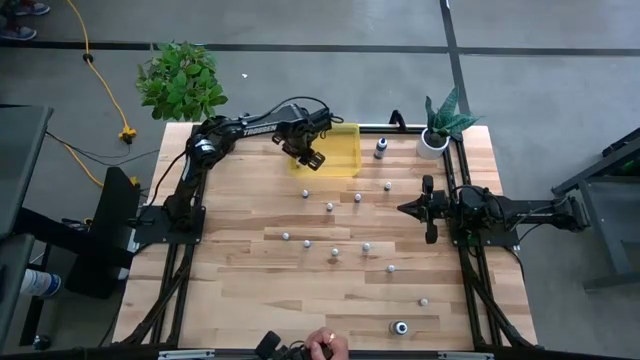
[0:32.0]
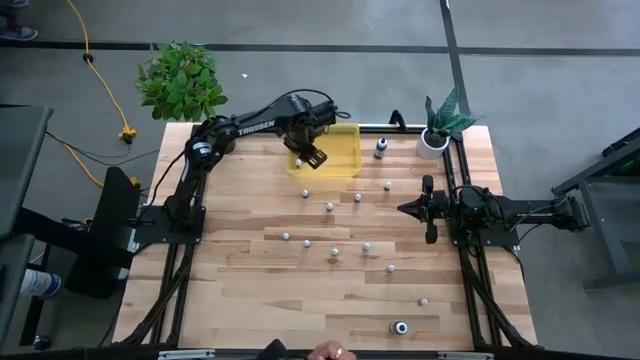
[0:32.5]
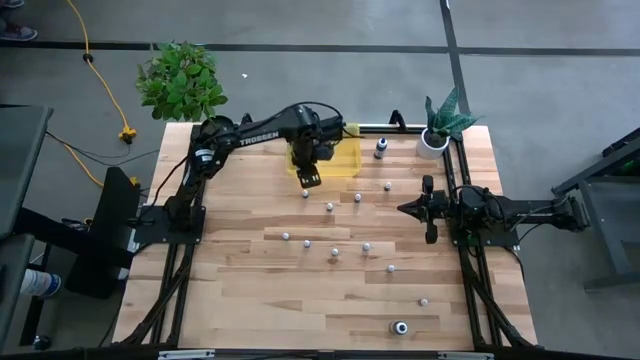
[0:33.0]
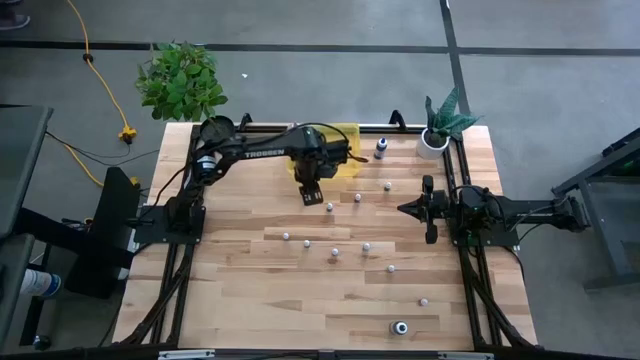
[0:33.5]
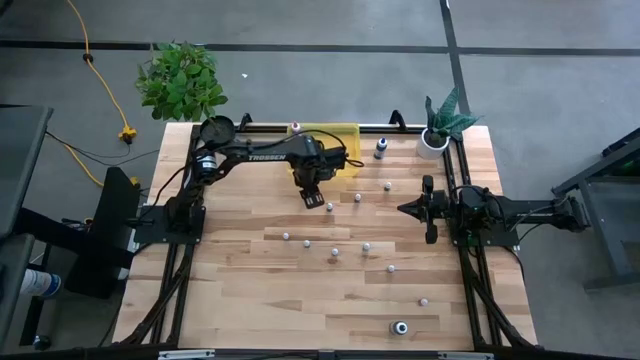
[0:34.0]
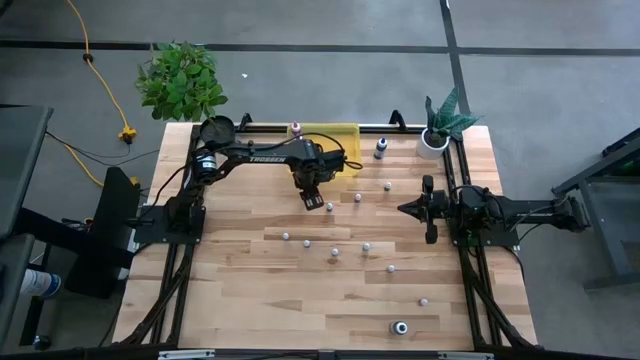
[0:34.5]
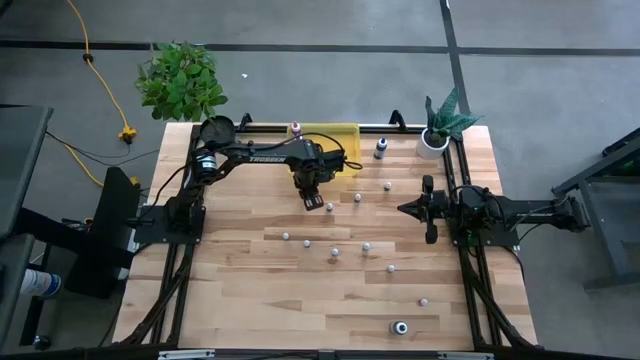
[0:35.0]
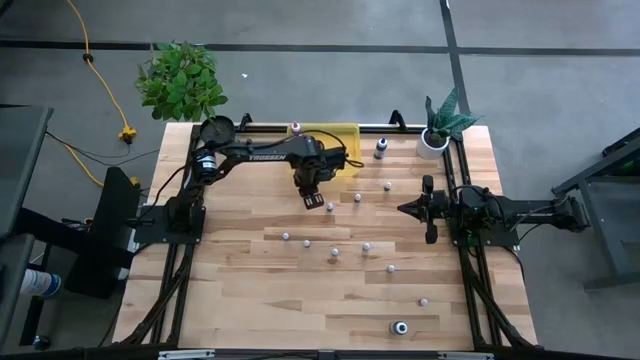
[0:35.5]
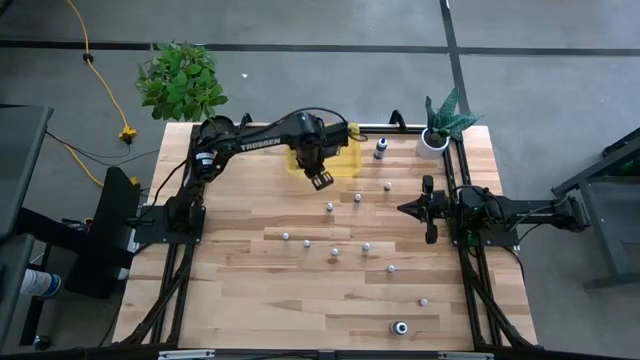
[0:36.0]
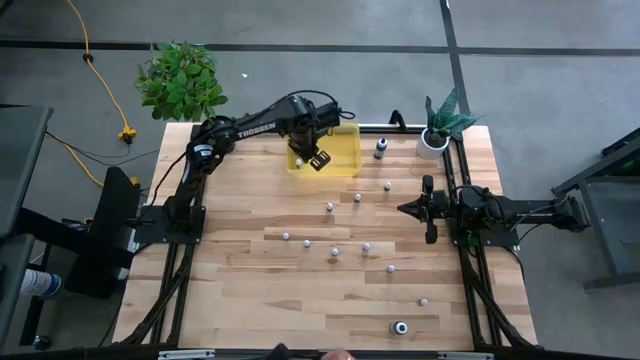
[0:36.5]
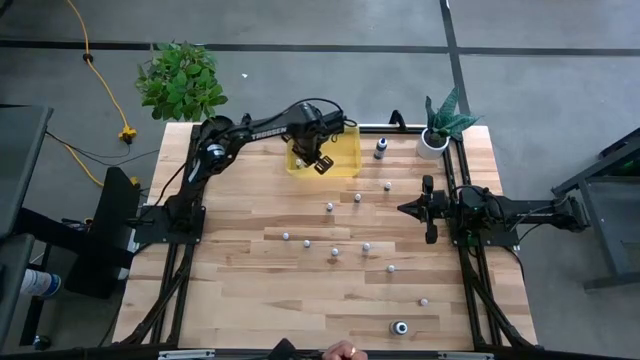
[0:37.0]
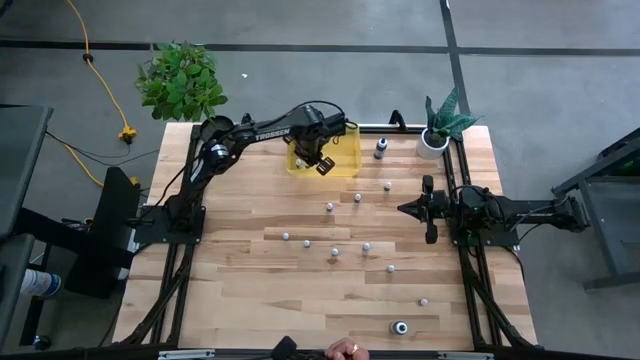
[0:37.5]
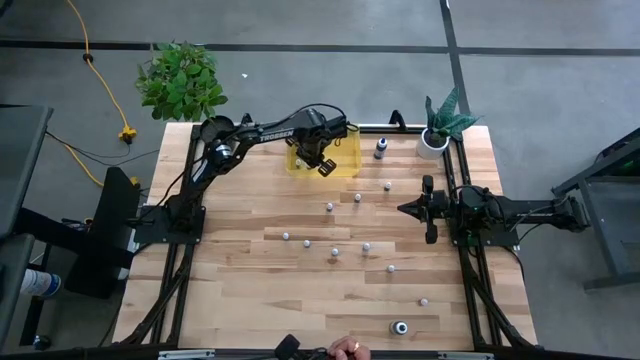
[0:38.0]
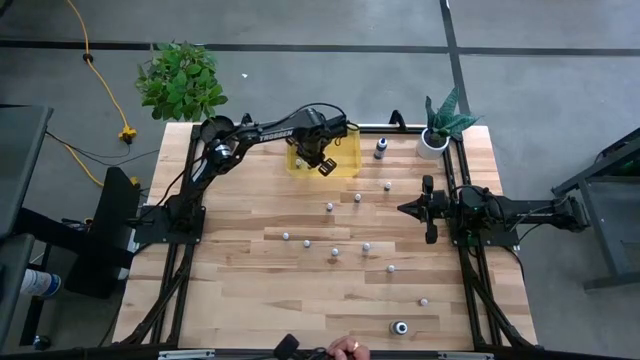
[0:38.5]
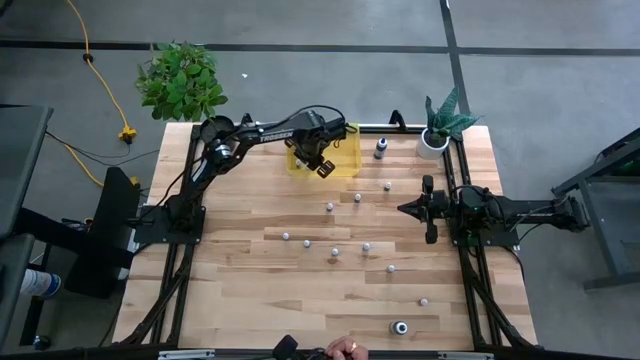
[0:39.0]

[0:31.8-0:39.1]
Task: Pick & Place food coloring
Put the small black food coloring bottle into the yellow container

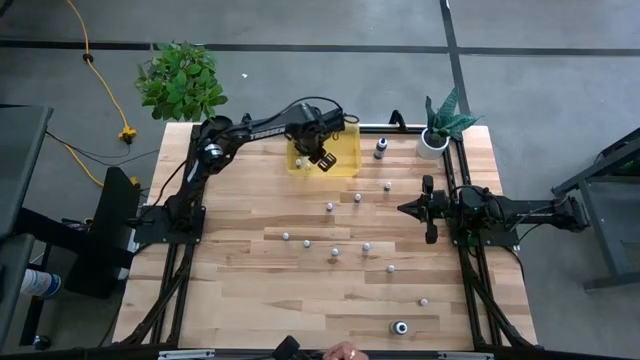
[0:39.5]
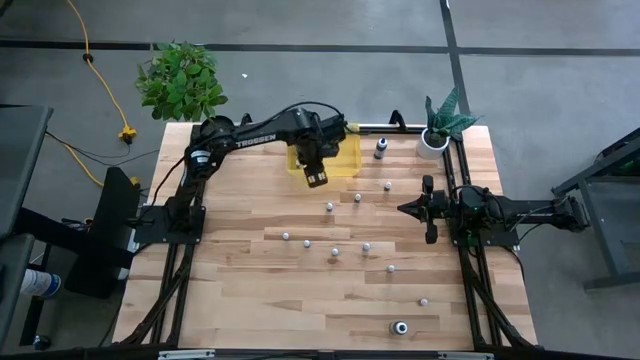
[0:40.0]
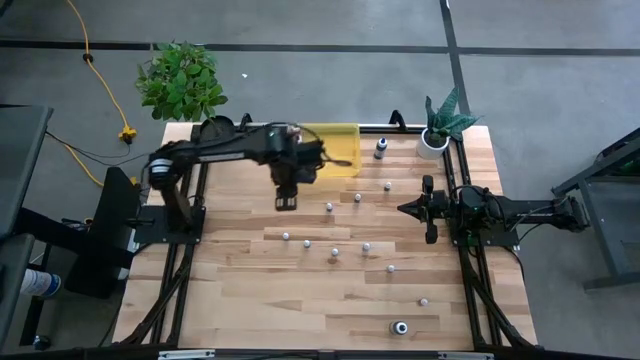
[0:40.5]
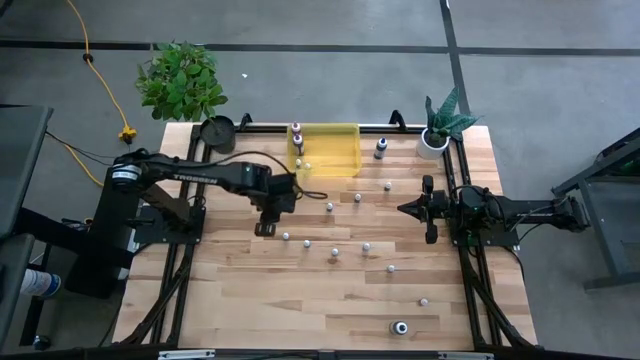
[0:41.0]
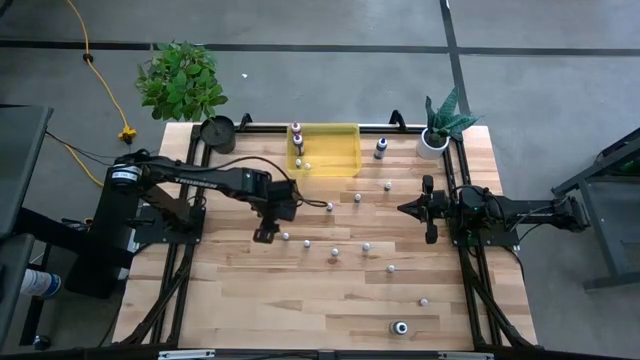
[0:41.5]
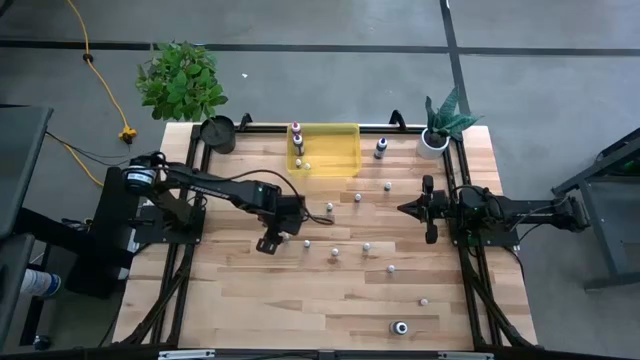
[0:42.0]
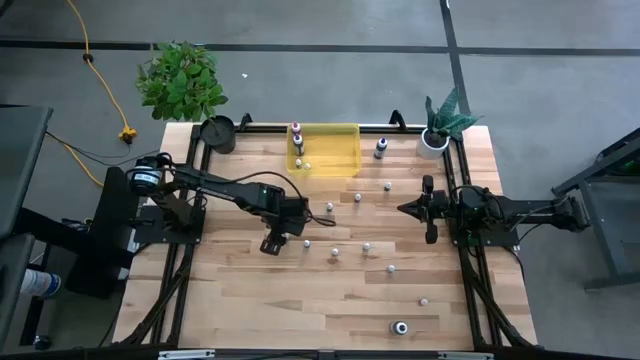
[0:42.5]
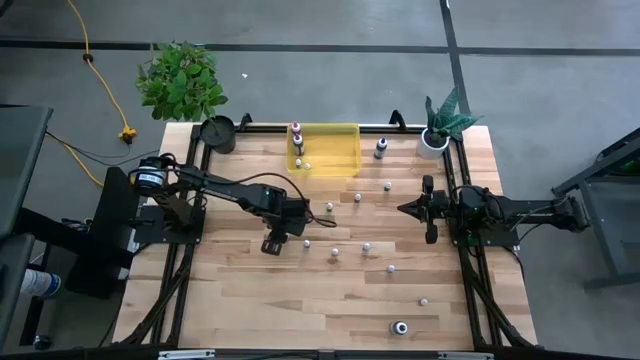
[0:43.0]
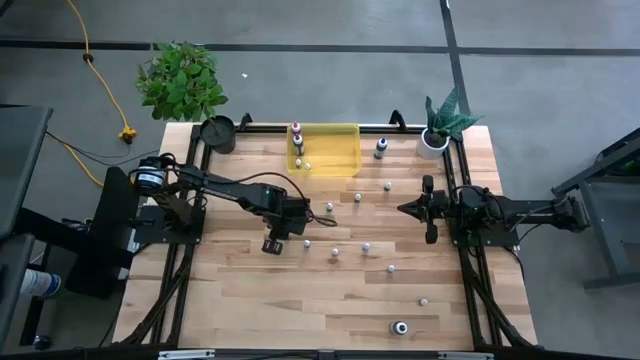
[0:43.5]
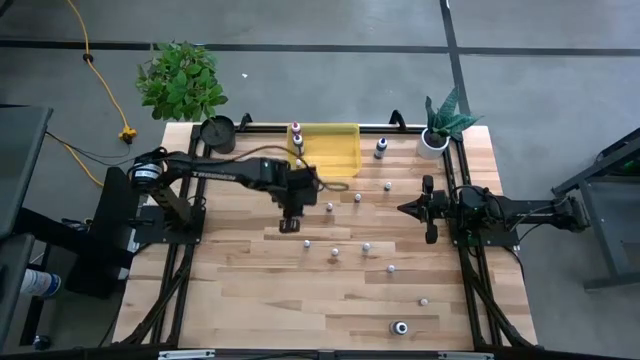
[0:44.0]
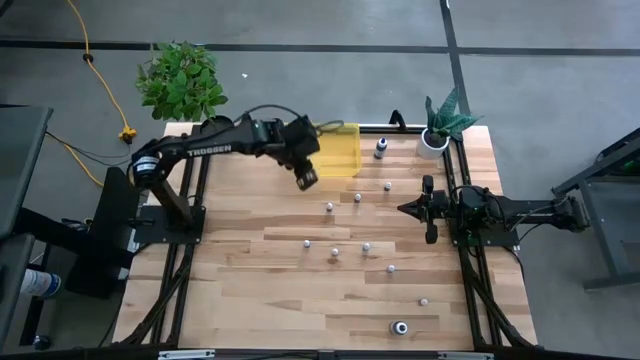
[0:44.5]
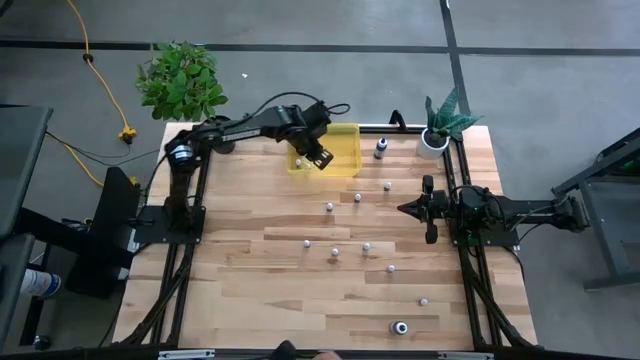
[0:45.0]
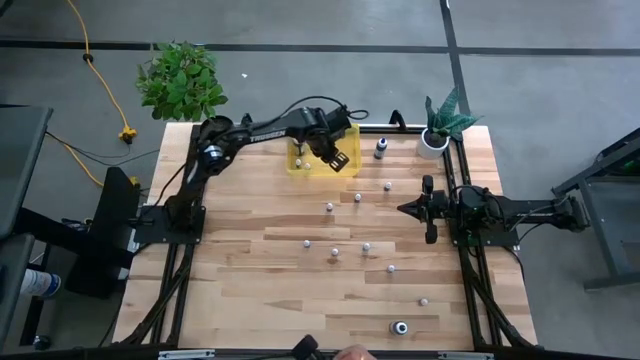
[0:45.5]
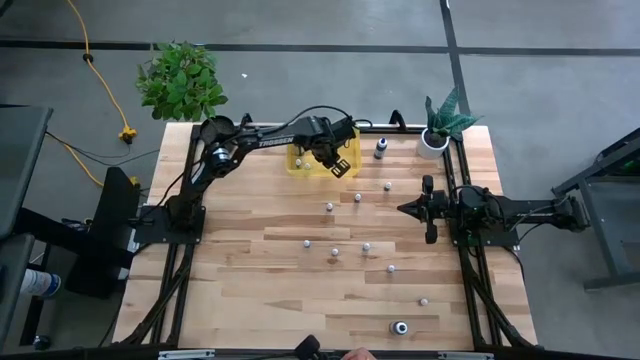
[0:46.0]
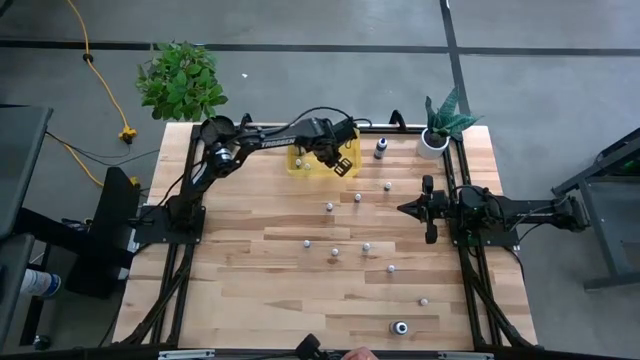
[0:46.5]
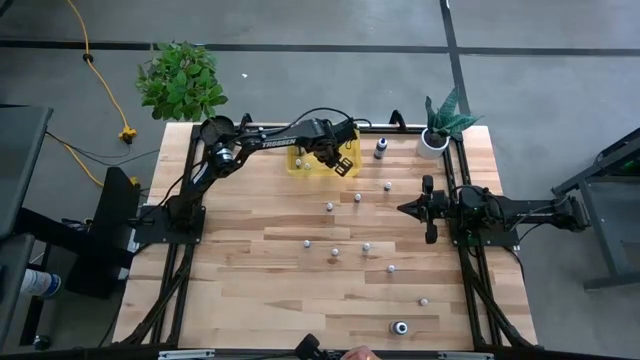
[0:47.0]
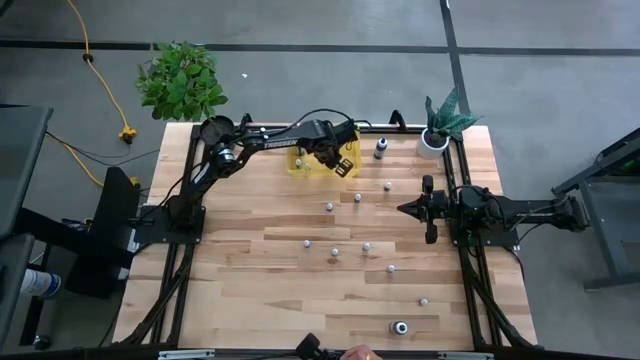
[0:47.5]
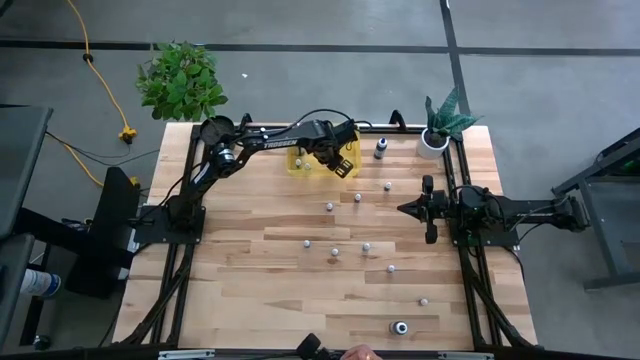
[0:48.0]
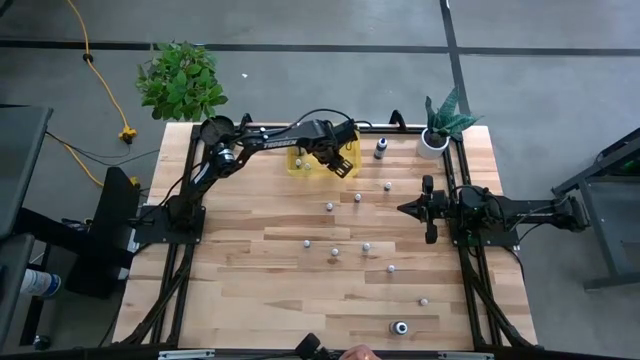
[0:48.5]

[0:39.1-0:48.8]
Put the bottom small green food coloring bottle into the yellow container

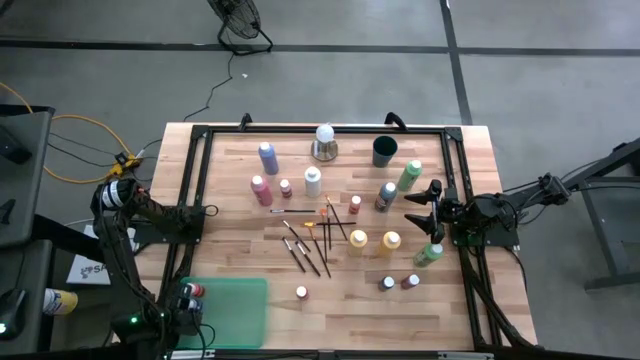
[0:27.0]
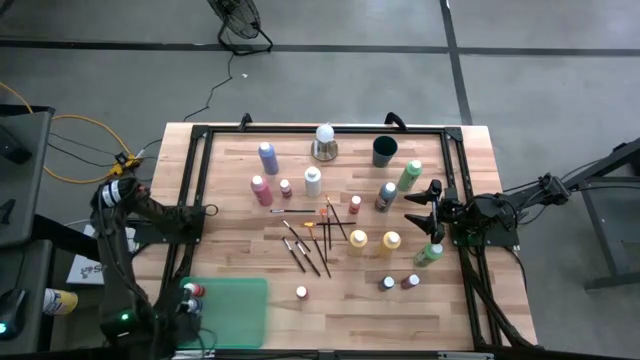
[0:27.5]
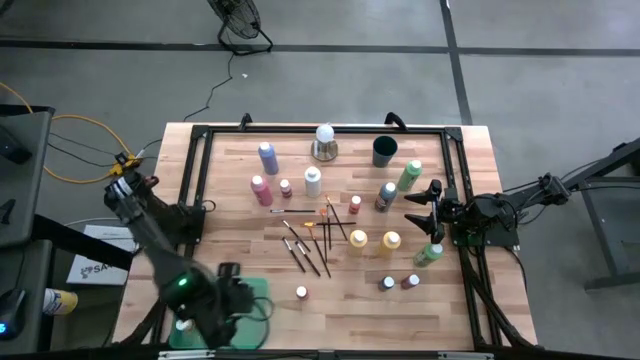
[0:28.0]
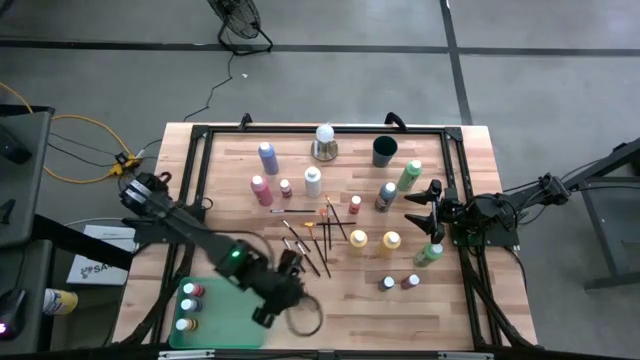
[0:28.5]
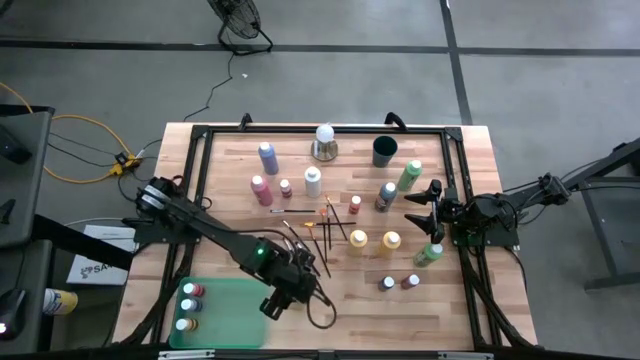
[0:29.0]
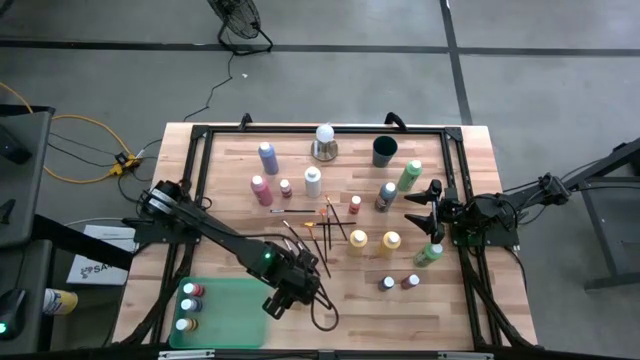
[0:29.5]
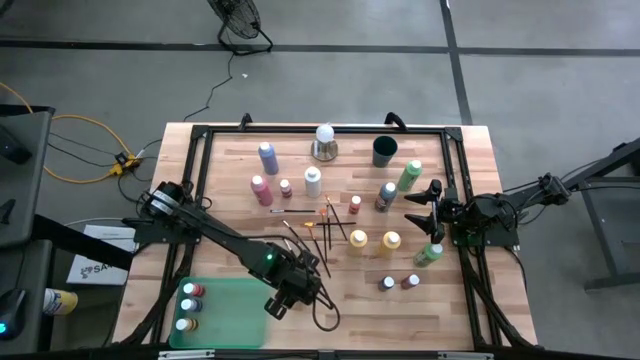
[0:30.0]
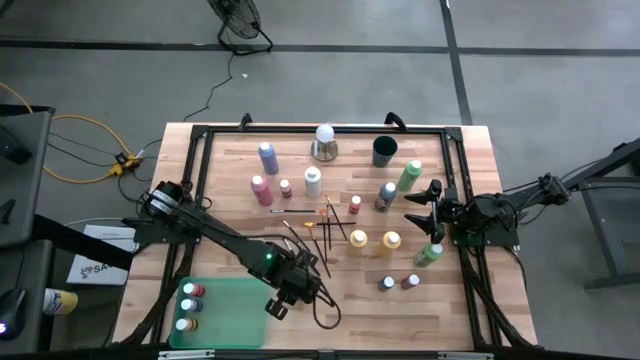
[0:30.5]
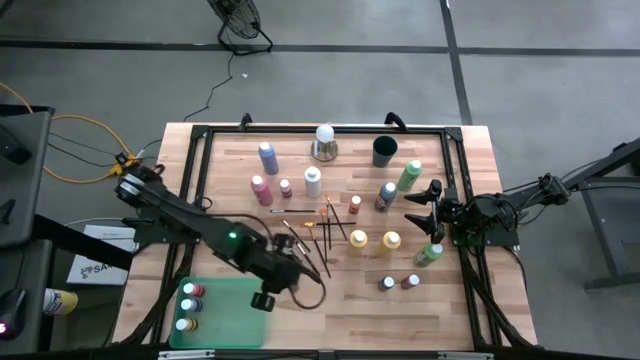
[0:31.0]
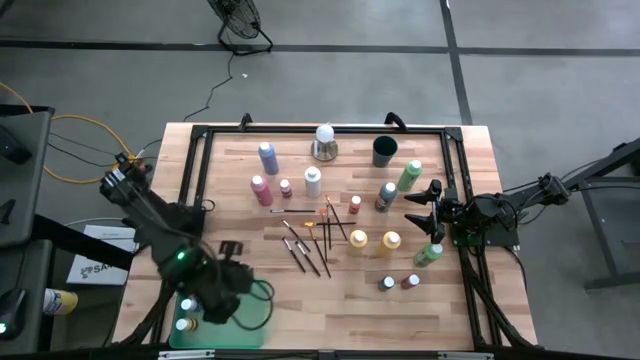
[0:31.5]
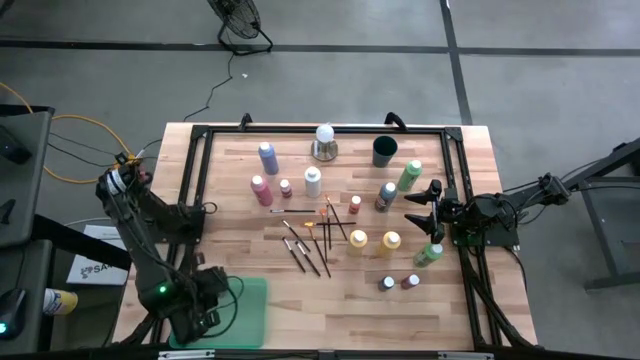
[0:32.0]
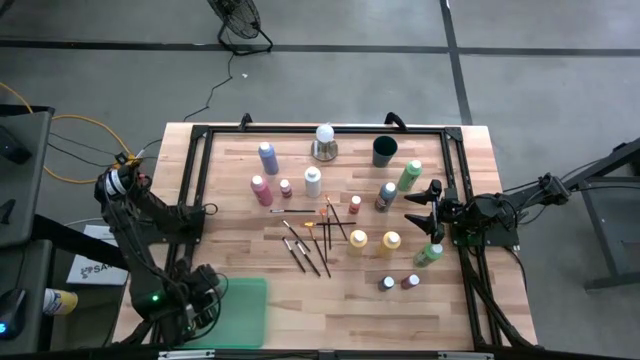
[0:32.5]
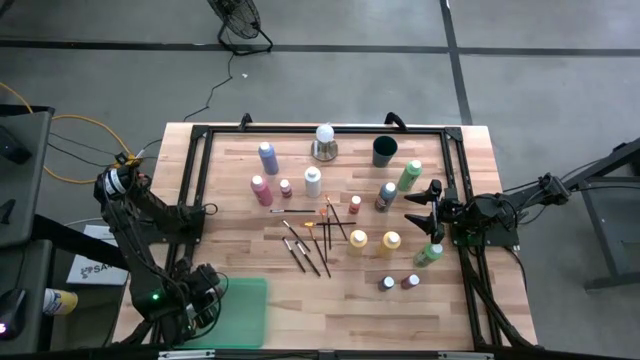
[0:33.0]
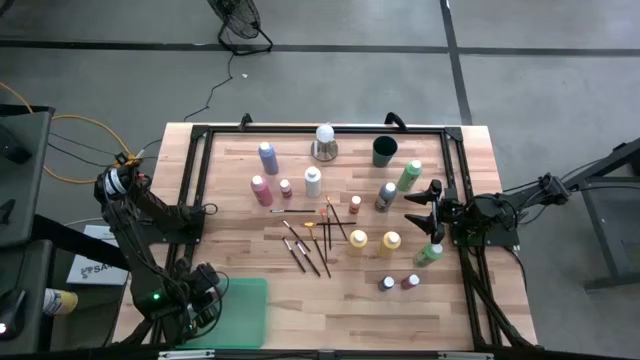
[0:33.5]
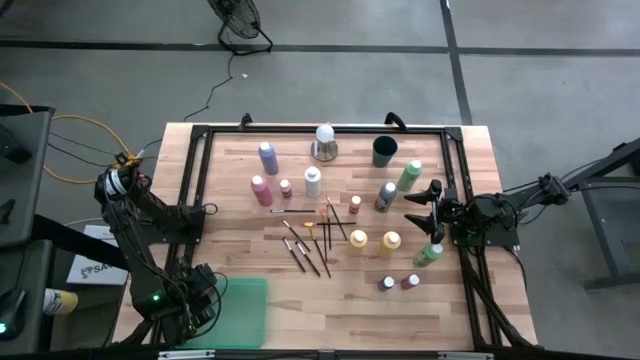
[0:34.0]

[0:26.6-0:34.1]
Task: Pick & Place Paint Supplies
Put the red paint bottle into the green bin
